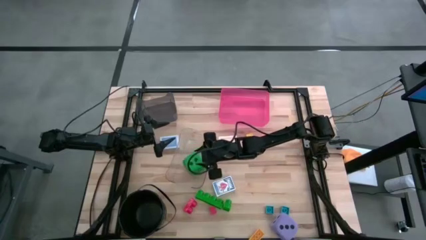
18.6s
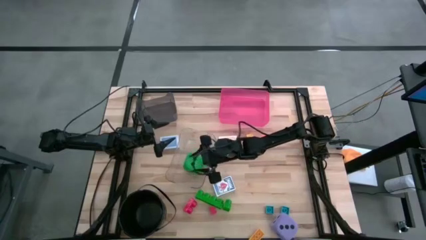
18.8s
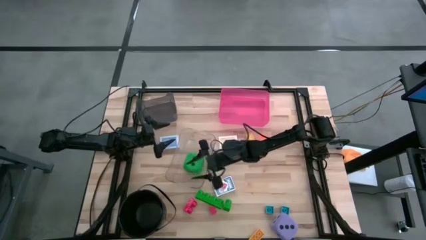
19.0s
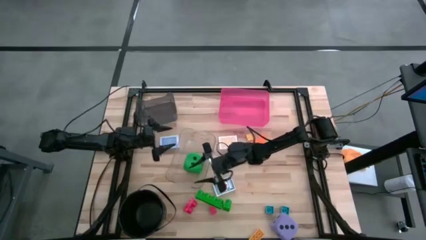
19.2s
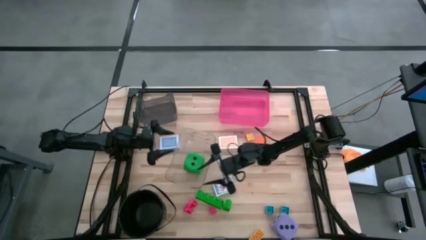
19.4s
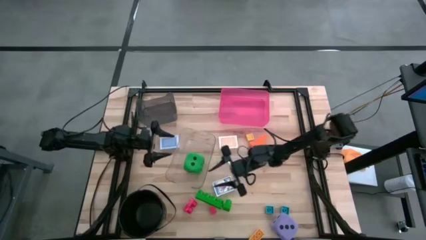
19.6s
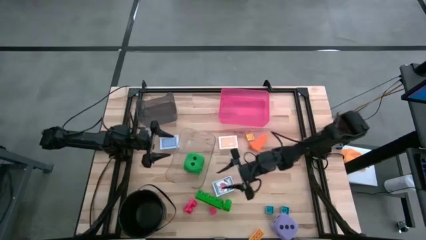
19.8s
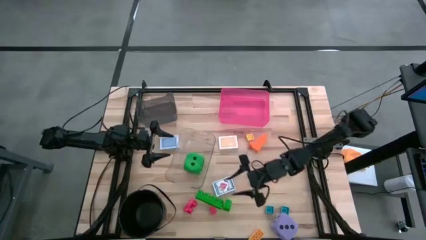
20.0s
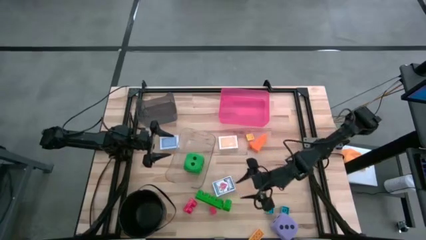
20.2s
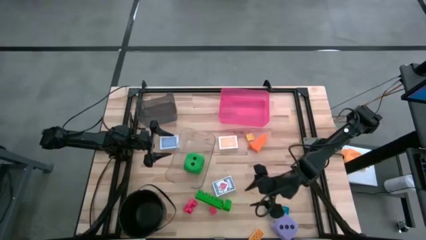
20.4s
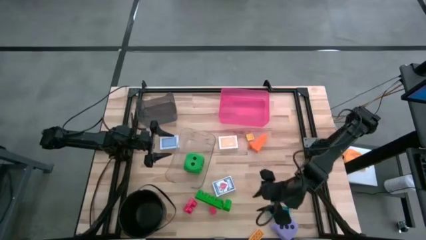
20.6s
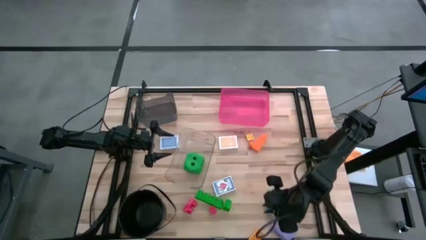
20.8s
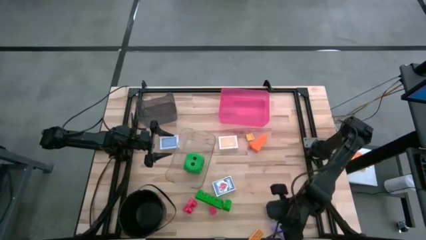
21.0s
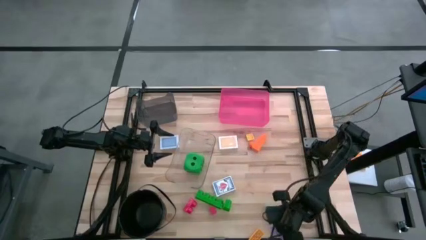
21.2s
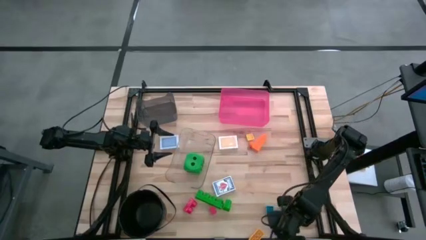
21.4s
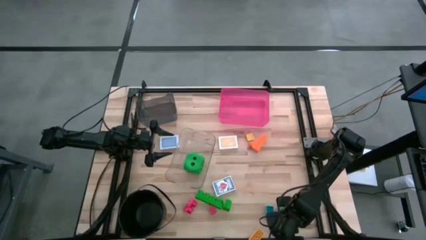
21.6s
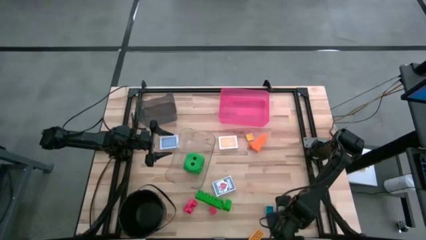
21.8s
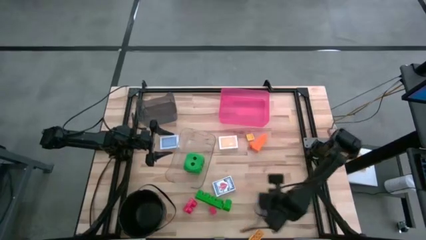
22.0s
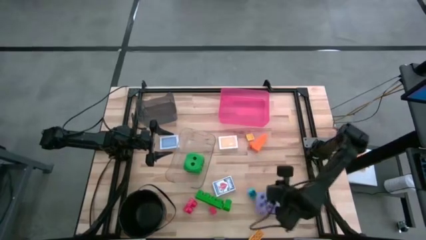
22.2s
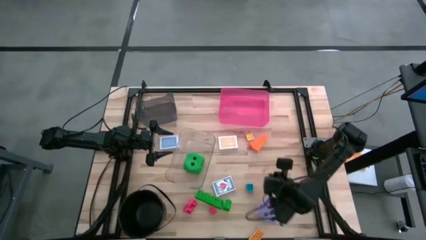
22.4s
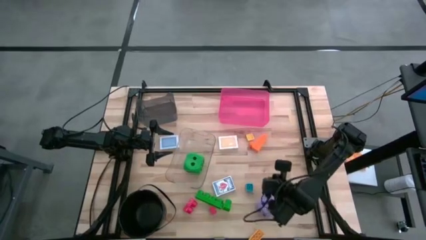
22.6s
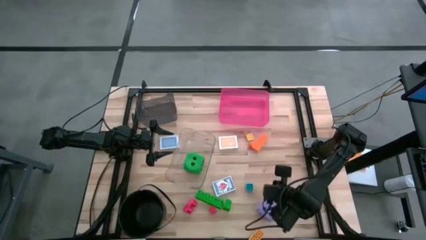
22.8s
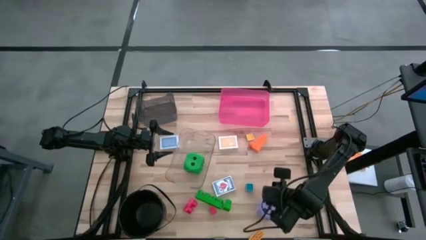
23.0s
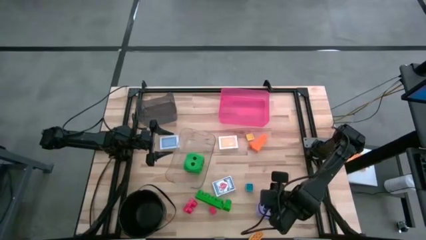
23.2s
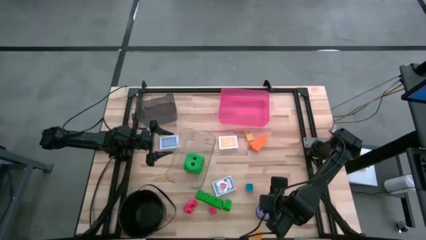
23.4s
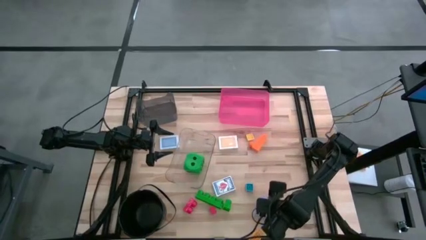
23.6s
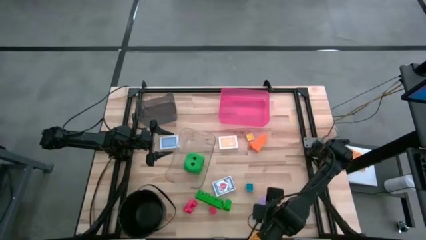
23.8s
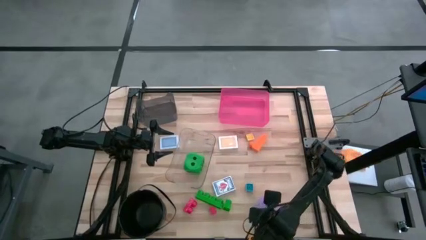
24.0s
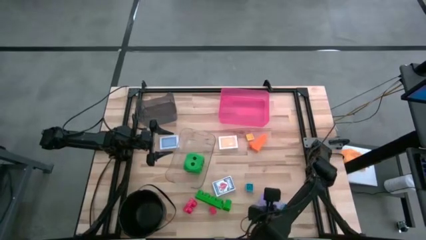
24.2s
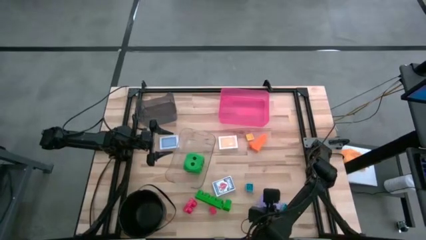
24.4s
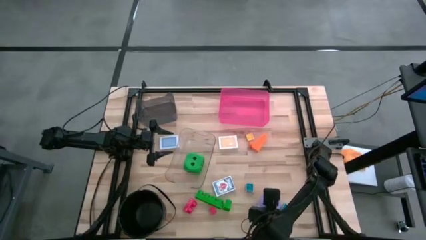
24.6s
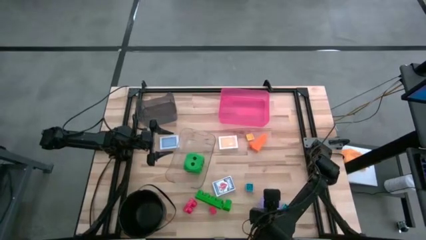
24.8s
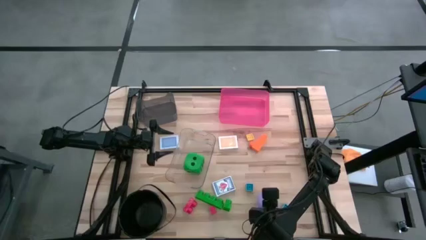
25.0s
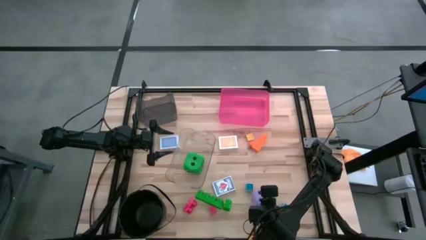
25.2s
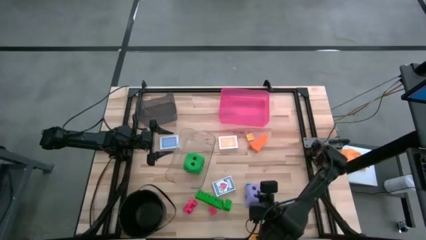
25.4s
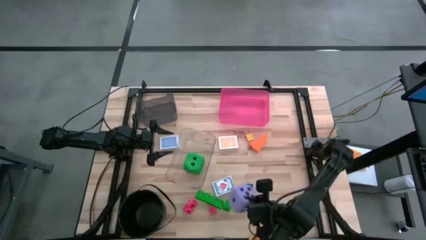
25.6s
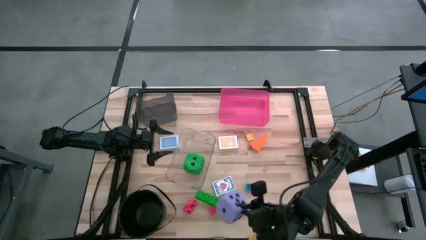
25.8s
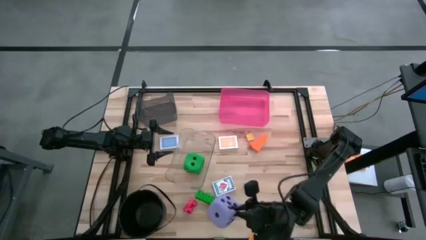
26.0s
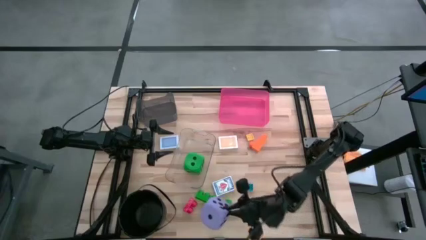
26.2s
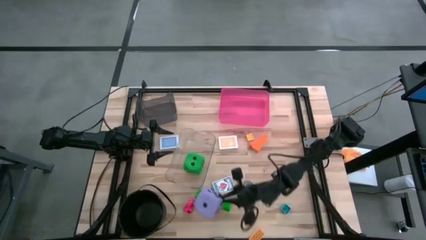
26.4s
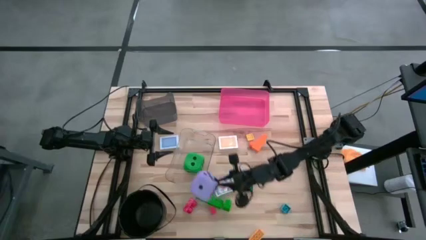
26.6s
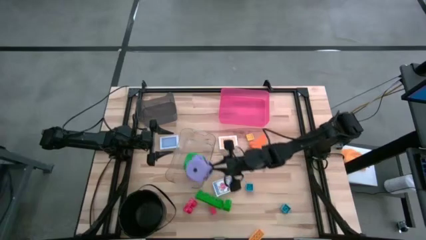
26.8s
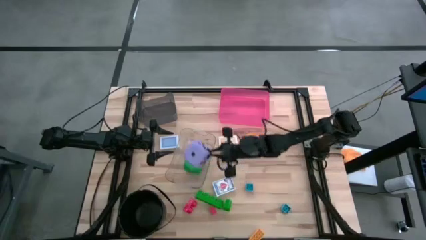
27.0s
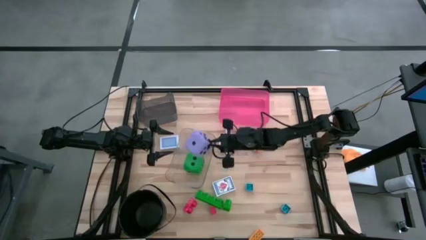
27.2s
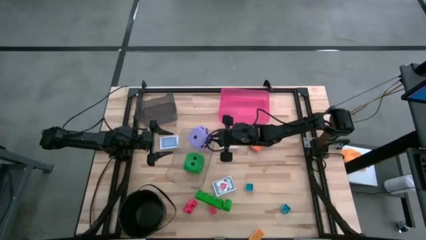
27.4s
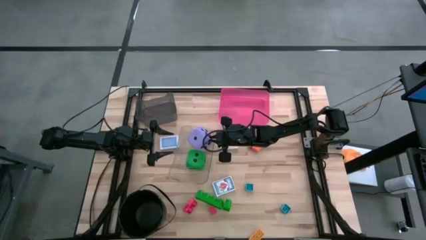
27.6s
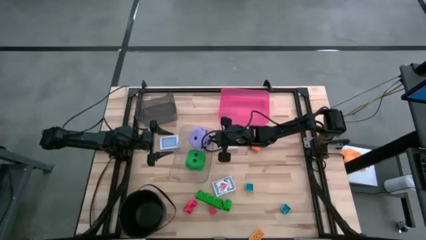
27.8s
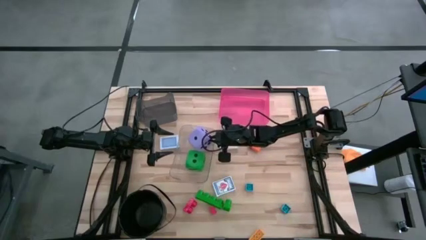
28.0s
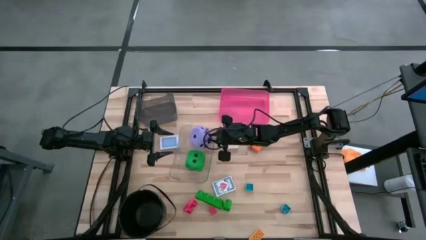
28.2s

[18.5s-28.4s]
Task: Pick & Place Toys
Put the purple dice into the transparent bin

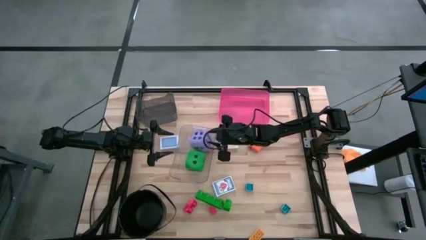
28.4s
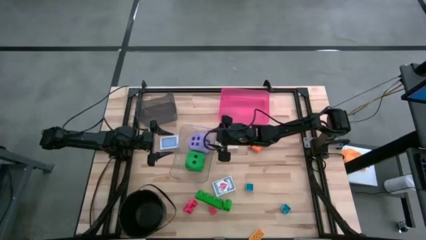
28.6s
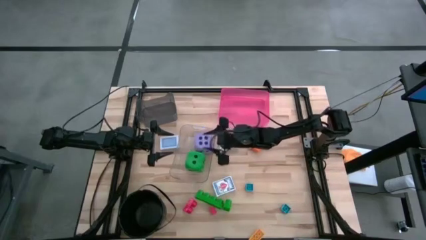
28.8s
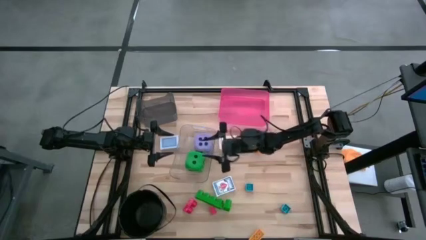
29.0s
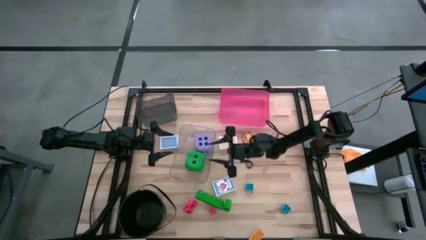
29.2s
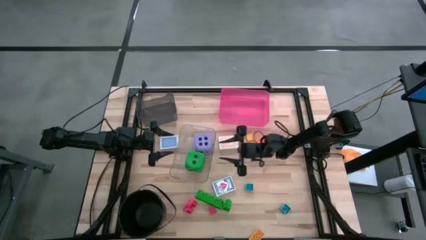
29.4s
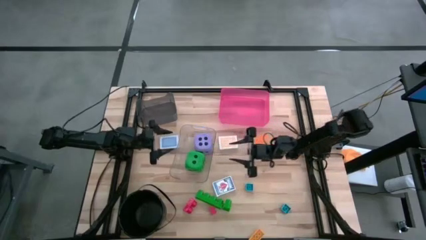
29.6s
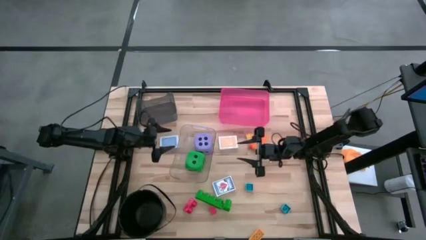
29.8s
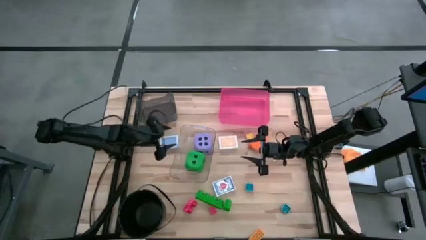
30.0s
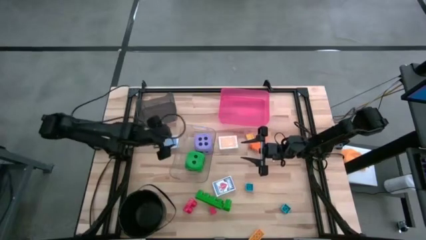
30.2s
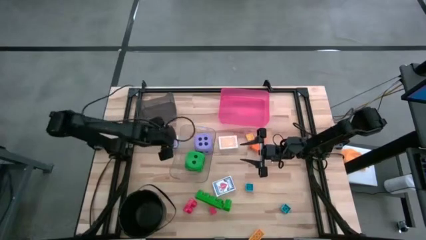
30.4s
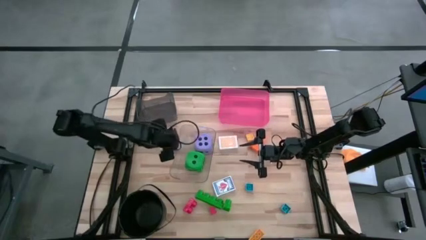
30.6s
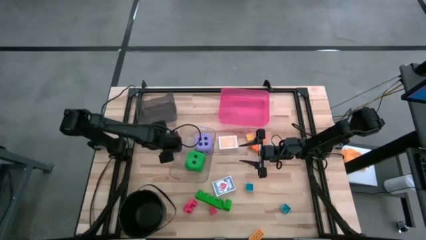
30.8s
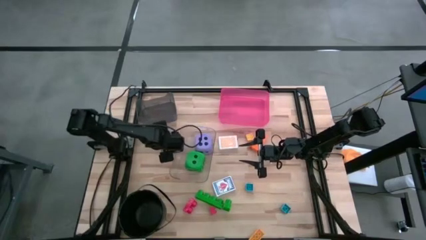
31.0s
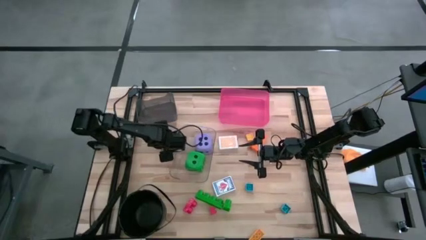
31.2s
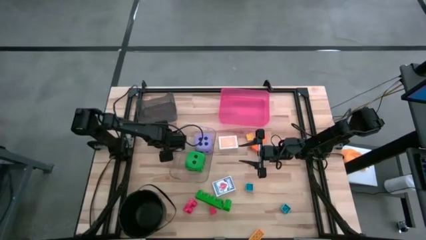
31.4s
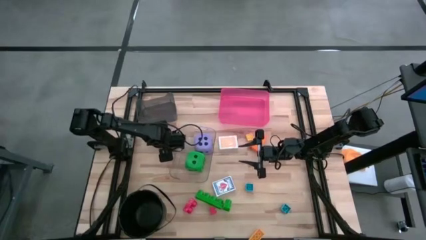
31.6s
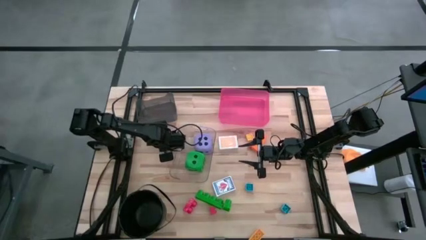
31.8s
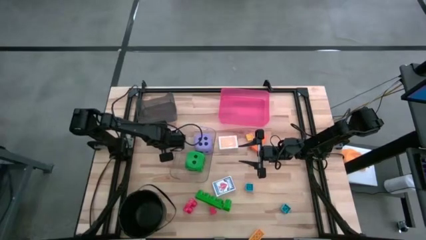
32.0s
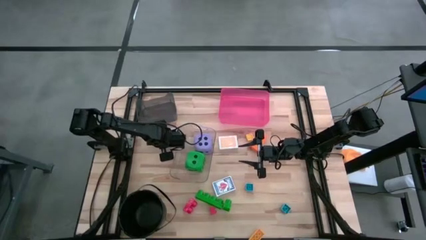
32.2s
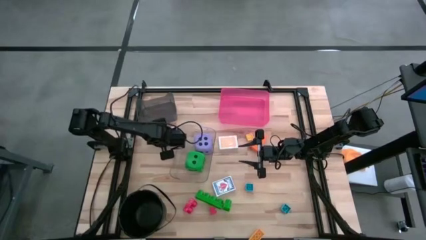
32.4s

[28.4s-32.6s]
Put the blue deck of cards into the black bin
